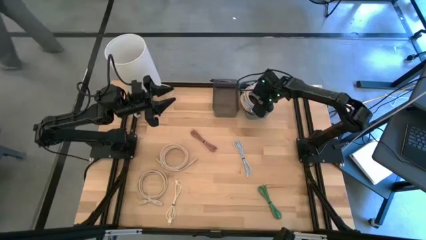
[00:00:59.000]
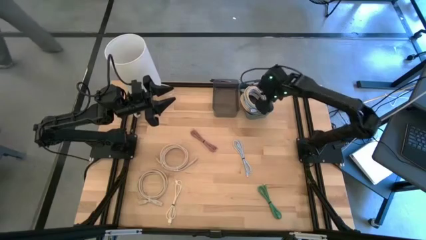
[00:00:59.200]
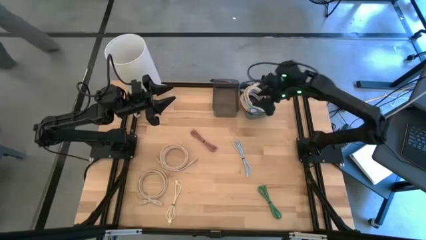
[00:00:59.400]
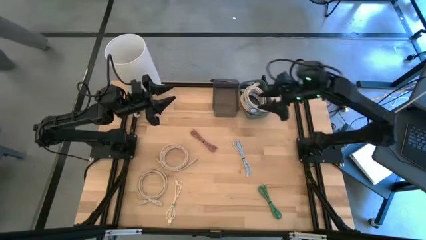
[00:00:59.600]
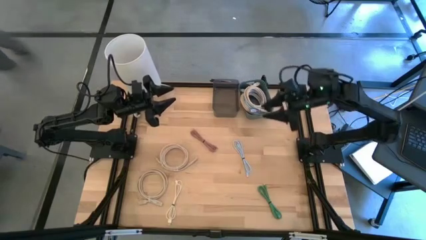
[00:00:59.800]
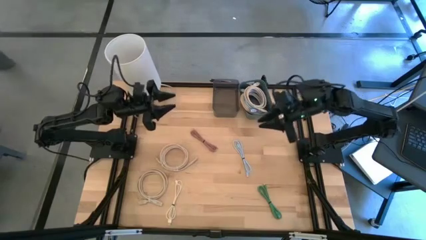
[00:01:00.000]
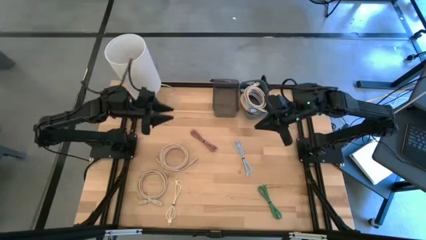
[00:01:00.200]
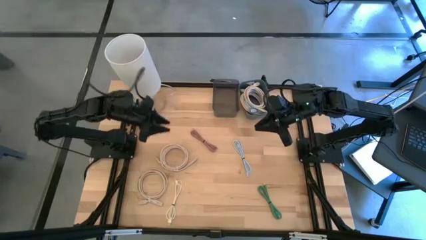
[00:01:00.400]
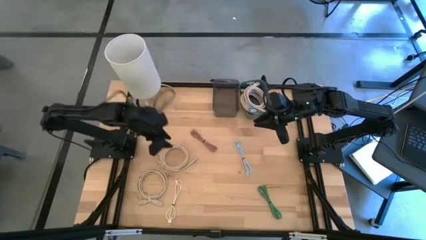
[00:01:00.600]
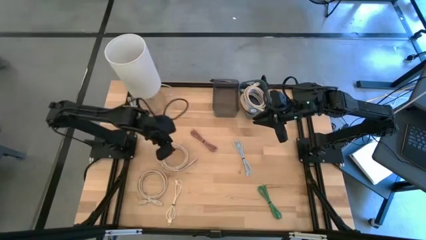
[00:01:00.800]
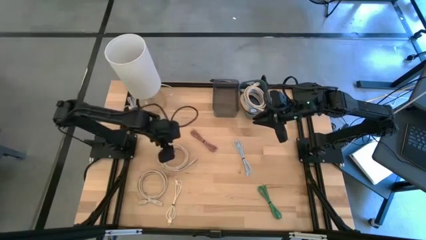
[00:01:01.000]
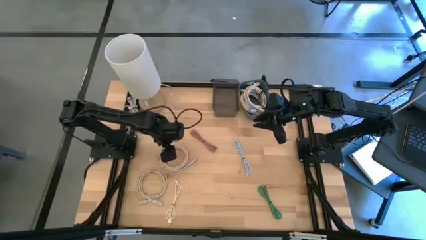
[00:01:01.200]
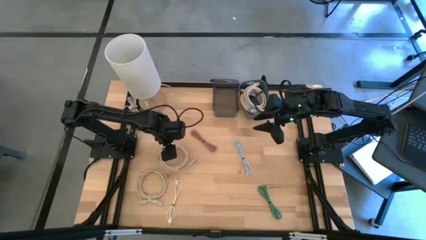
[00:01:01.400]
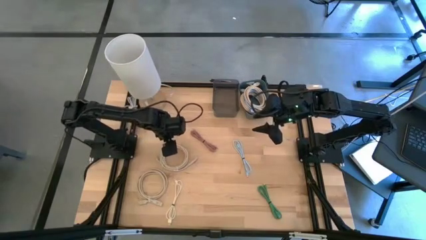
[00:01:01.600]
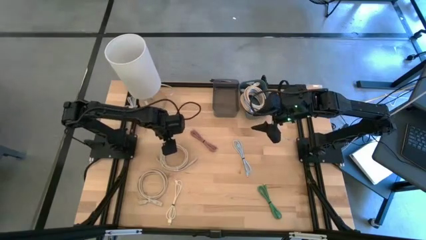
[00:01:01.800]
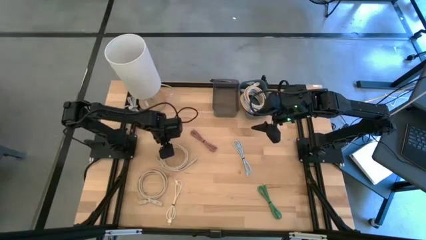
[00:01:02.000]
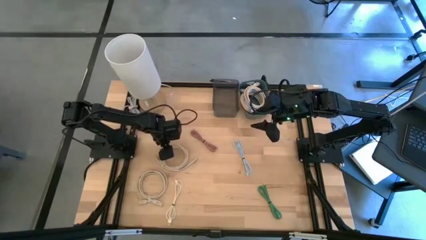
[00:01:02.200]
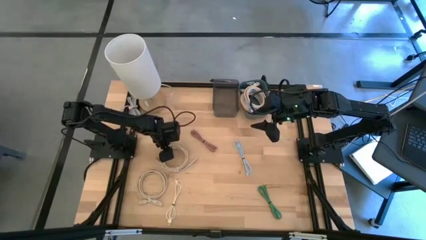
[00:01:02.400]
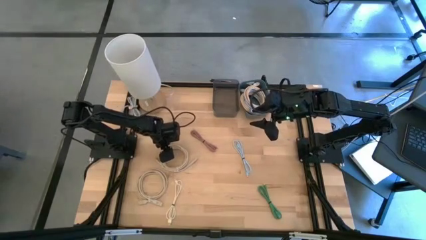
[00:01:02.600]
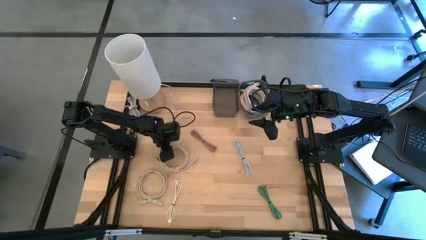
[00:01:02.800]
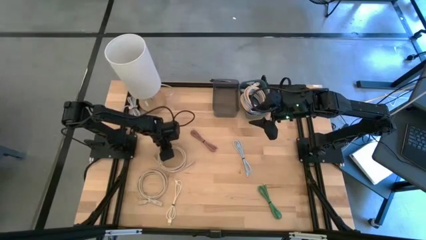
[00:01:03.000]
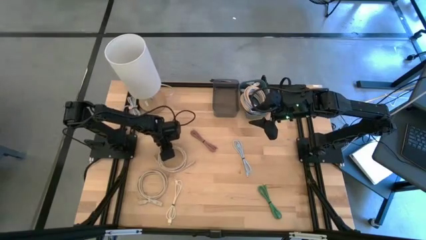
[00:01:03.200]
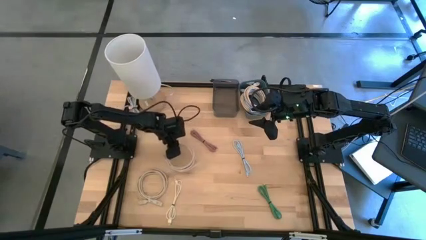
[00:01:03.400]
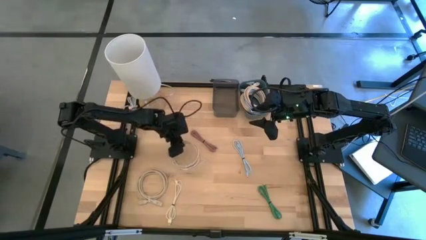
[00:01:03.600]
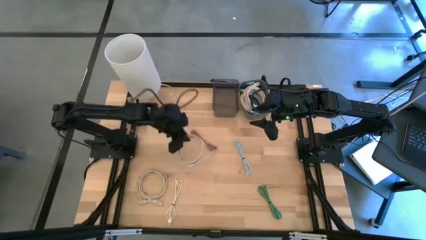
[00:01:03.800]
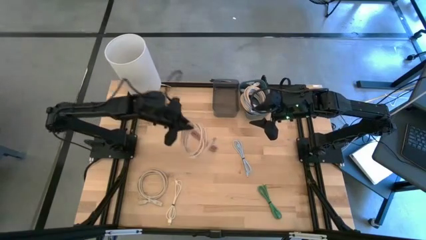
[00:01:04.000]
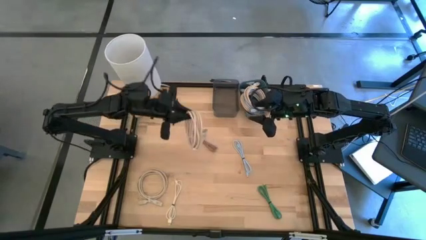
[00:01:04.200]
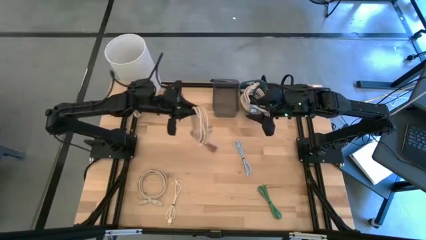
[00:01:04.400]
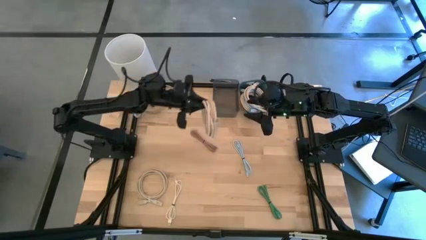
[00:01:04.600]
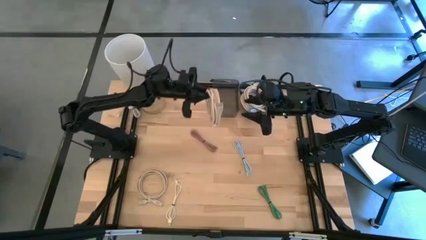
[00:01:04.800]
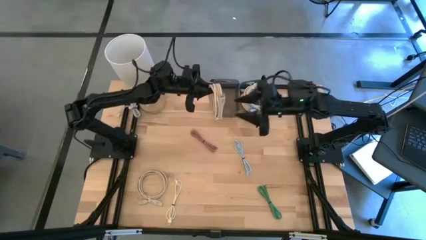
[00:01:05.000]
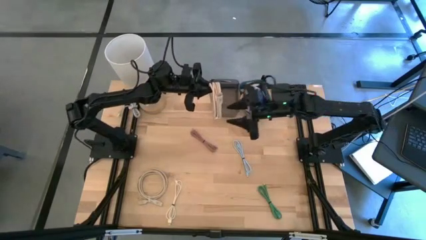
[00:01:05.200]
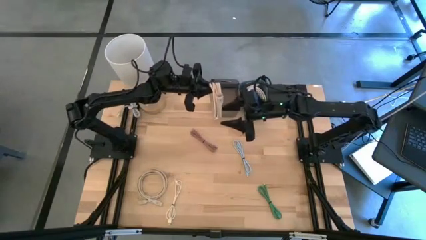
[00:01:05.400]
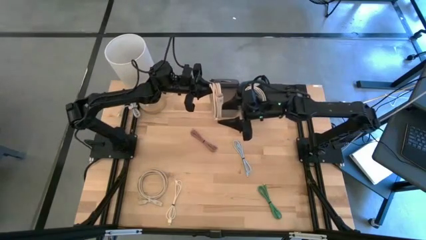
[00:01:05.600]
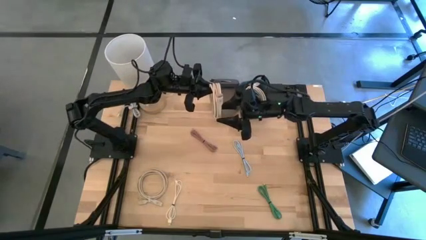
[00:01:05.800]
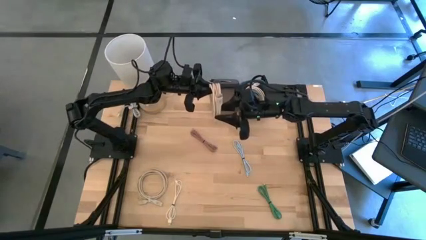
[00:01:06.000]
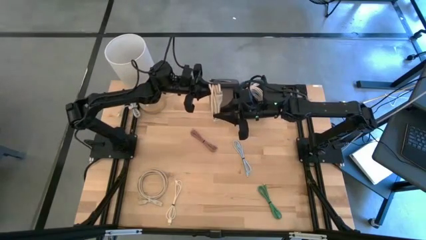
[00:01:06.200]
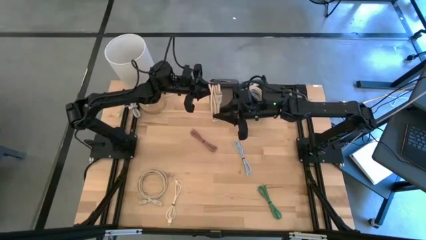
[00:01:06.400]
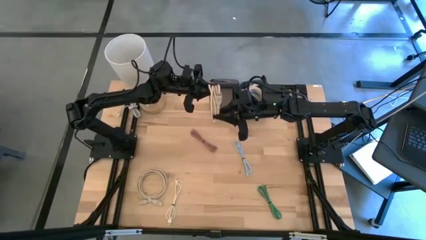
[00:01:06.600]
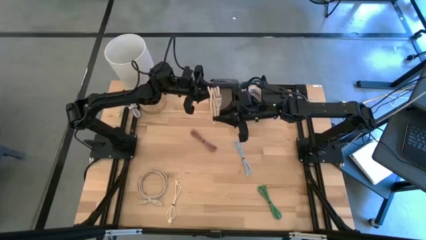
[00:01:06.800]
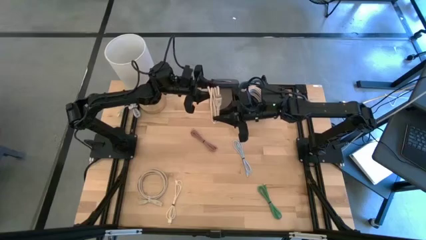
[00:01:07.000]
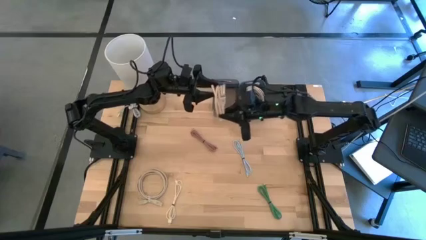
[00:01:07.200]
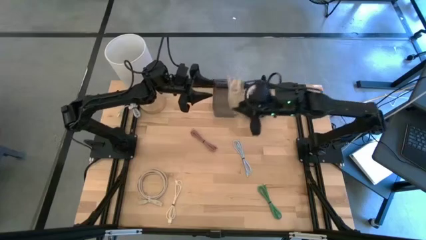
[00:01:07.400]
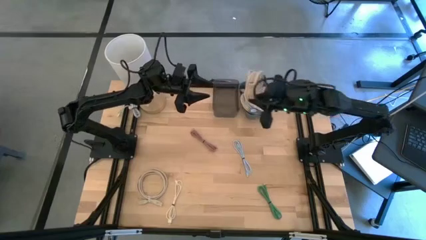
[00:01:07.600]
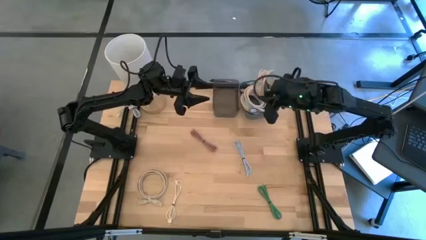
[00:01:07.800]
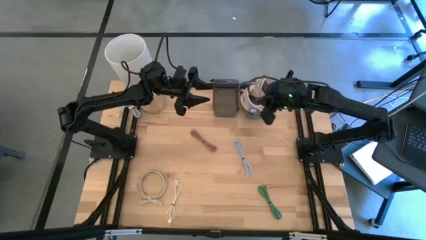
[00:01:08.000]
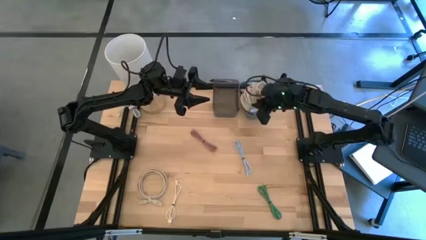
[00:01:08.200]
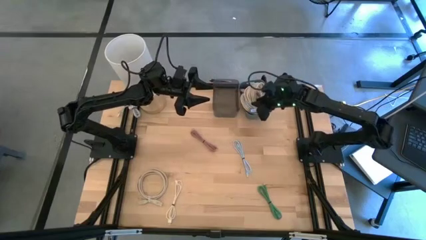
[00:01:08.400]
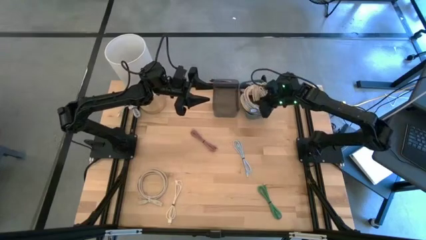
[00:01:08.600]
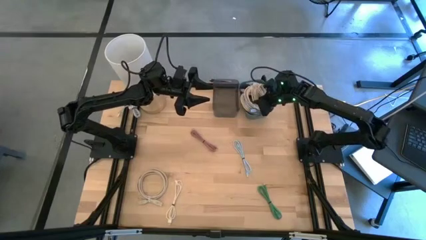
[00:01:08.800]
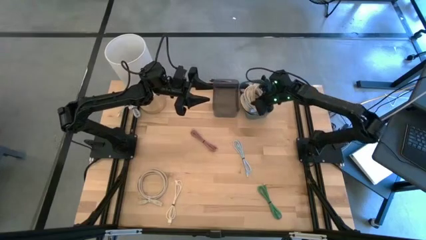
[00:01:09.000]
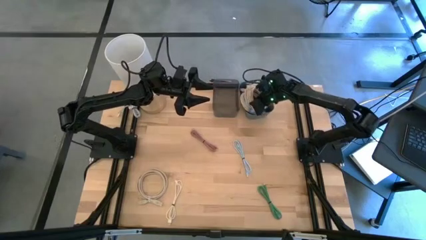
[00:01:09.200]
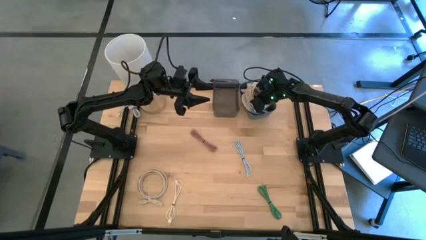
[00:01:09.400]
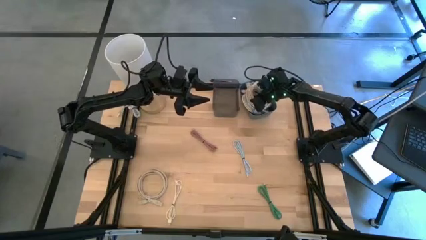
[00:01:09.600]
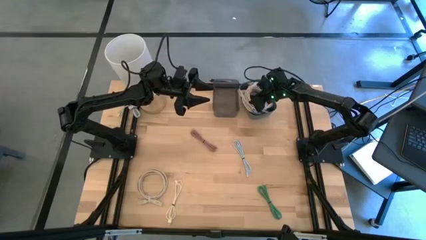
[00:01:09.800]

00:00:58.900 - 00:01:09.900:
Put the light brown HDMI cable into the blue bin
